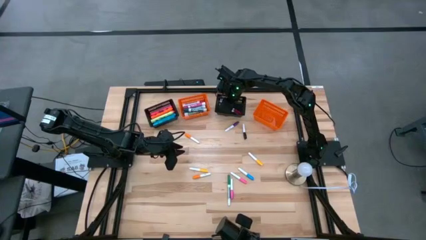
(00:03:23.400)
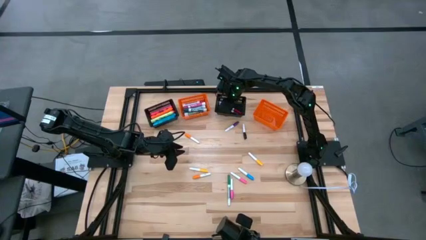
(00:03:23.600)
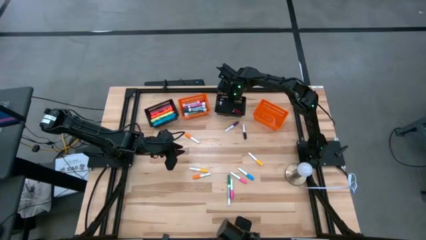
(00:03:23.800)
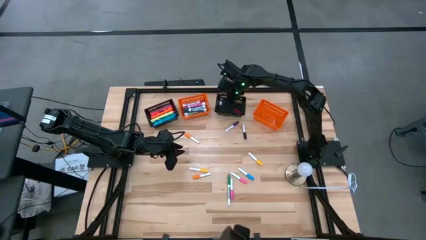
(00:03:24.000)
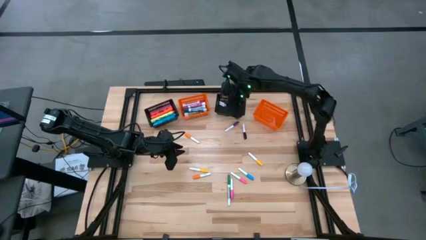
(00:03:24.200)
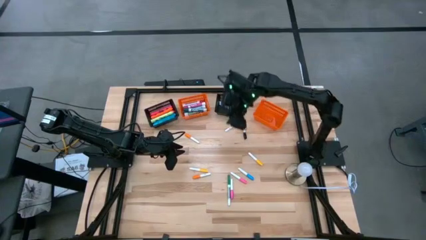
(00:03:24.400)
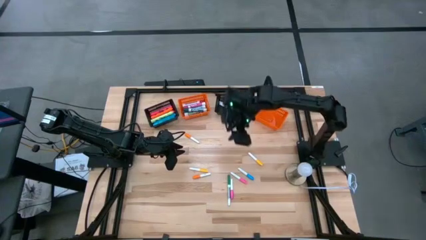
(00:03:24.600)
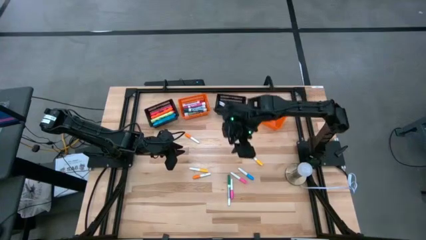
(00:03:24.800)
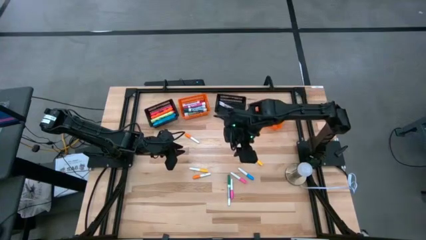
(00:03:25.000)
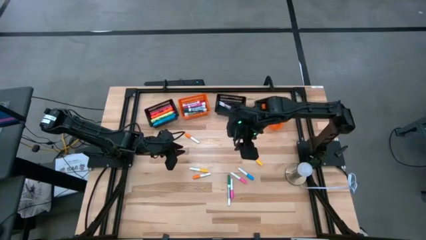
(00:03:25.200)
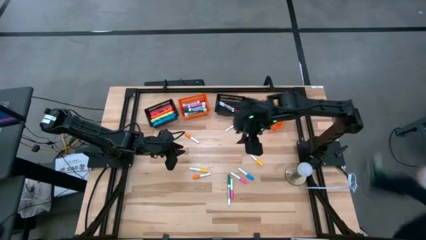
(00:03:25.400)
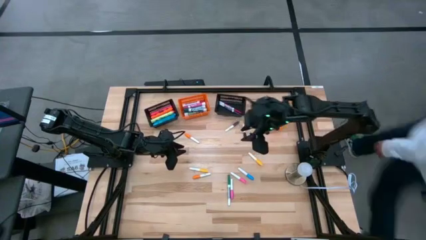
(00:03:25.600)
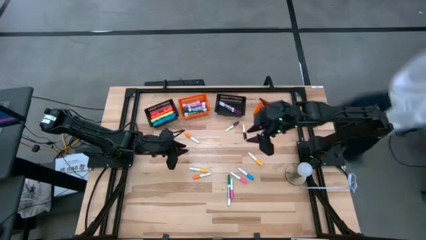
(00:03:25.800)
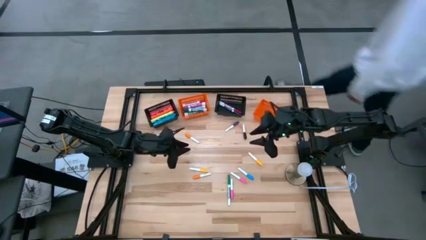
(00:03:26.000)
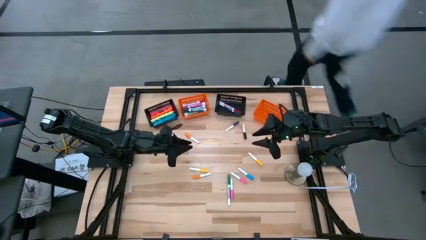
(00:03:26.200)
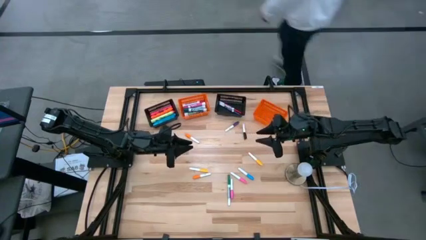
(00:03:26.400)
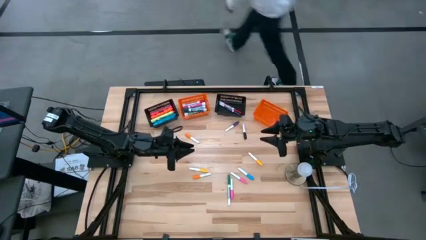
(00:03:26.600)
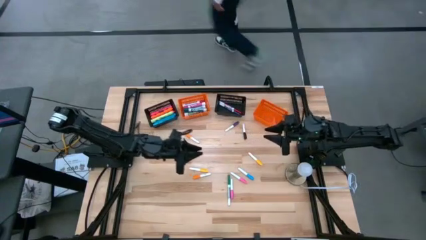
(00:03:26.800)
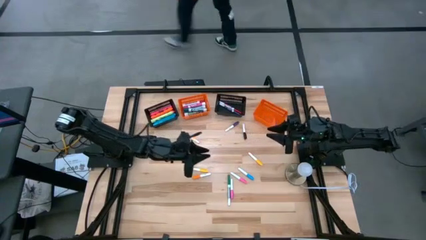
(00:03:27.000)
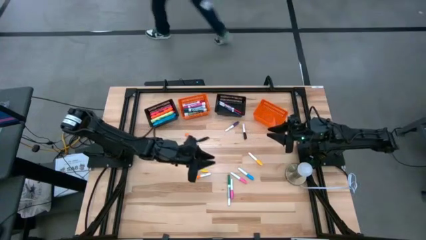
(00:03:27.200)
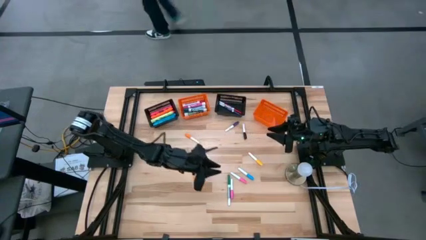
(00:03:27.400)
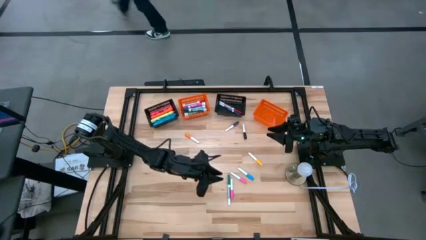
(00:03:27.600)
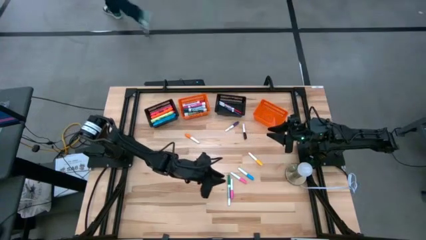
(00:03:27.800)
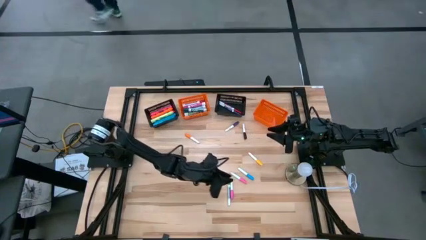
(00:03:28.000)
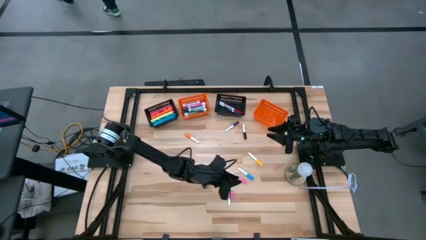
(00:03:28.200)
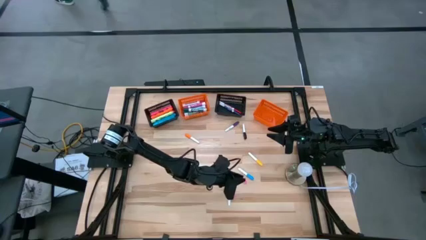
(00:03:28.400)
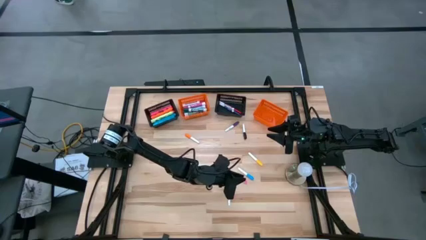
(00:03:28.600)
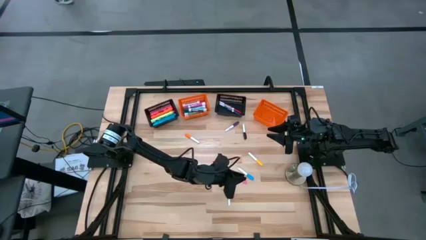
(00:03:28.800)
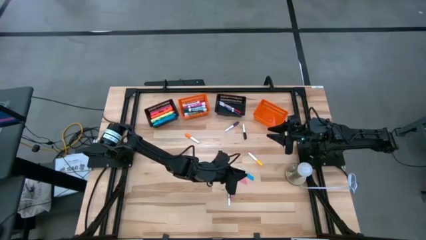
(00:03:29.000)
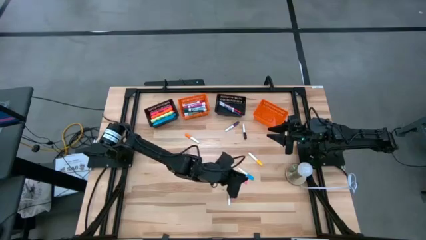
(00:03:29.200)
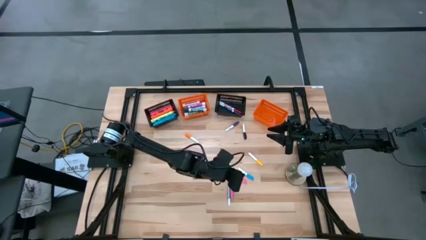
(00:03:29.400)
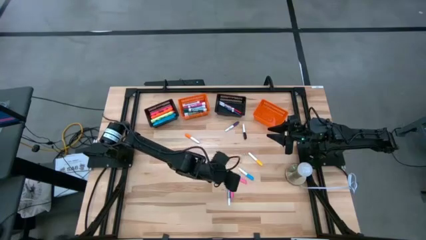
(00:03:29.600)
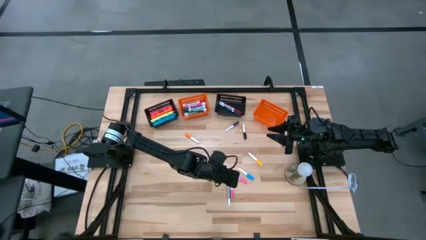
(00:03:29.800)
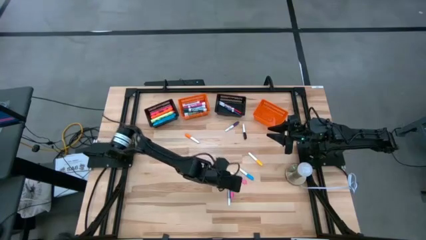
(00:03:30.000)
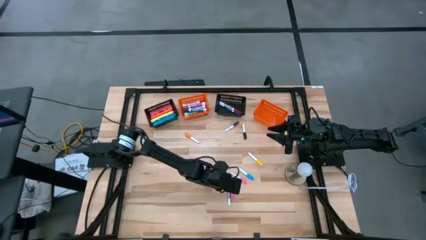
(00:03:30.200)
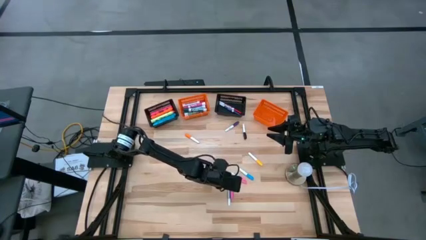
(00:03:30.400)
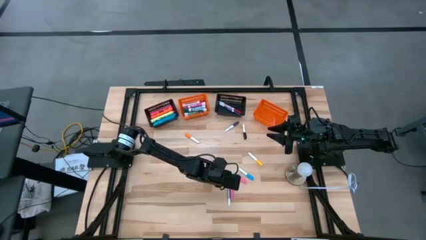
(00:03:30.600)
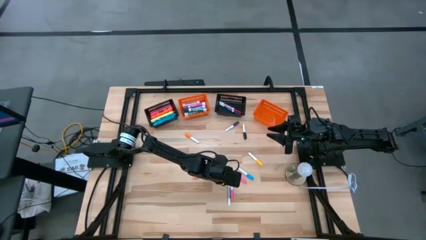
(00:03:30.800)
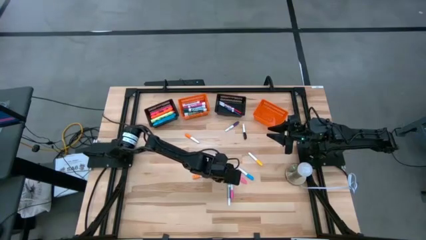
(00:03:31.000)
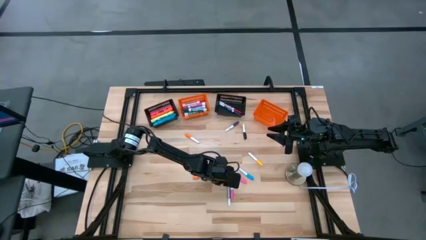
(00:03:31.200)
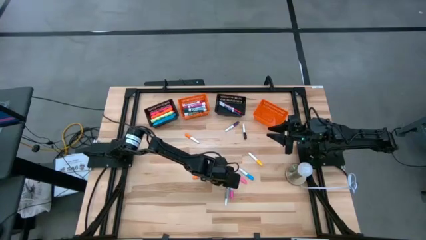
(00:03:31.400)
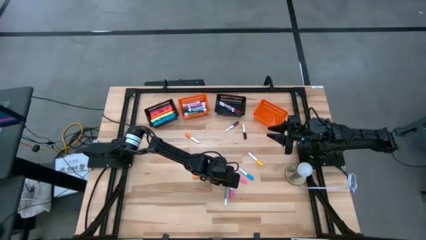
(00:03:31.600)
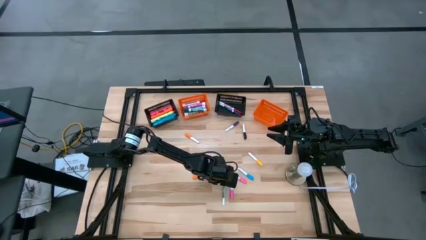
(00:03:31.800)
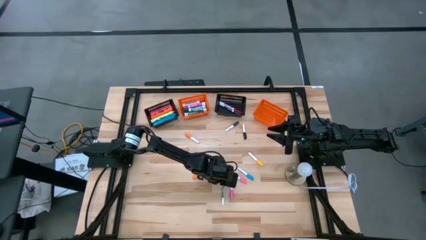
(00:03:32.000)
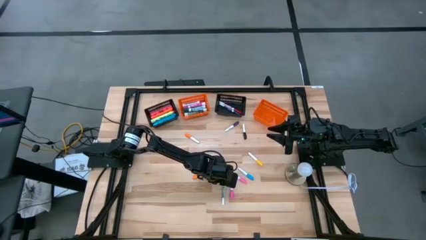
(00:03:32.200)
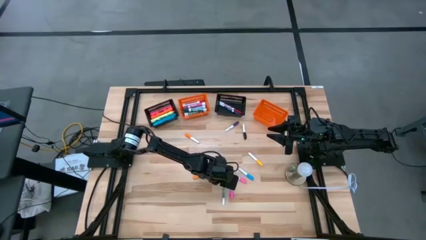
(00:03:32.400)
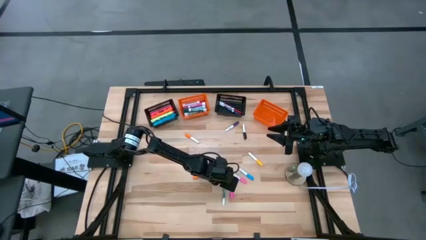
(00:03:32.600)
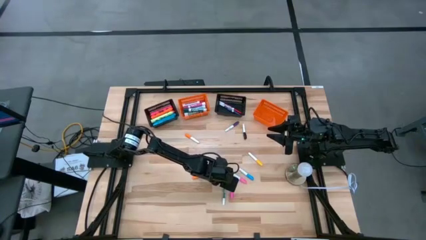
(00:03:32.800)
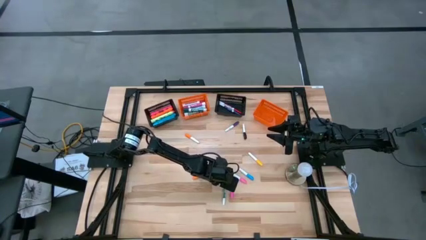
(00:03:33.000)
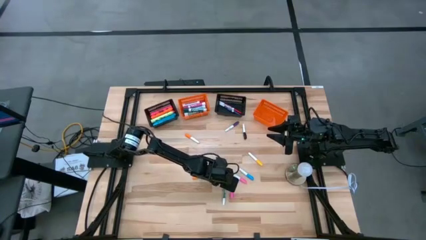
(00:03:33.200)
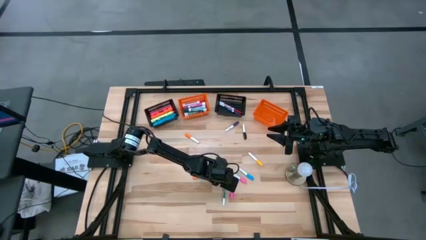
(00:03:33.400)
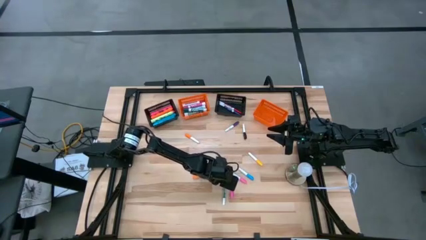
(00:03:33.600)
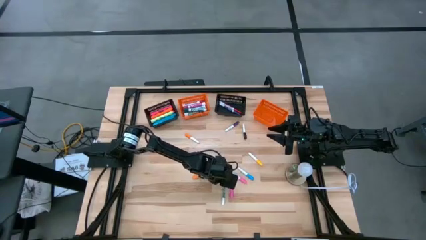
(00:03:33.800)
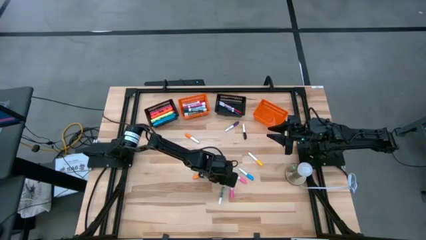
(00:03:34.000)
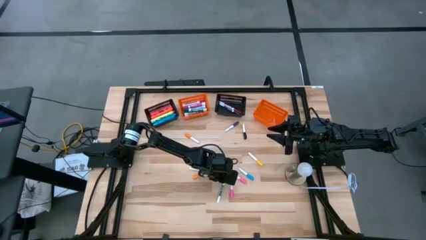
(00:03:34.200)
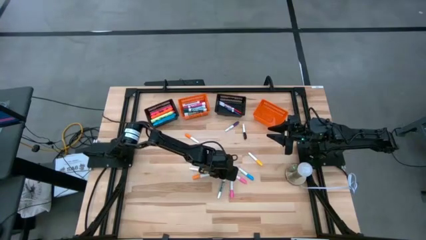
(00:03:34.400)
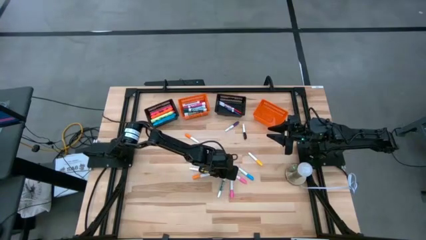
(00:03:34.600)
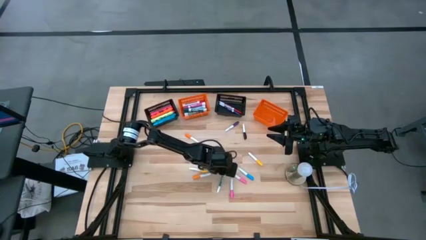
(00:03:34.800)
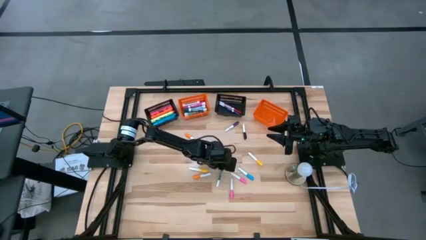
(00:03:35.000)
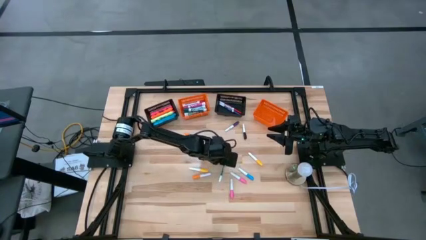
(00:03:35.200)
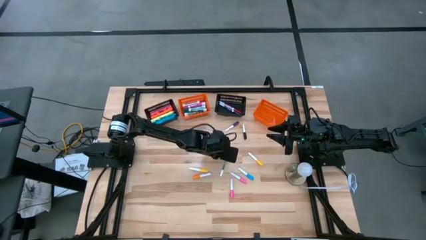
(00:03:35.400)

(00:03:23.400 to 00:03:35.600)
Task: Pick & Place Markers
Put the green small marker pen into the right black bin

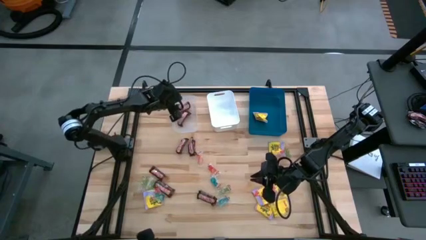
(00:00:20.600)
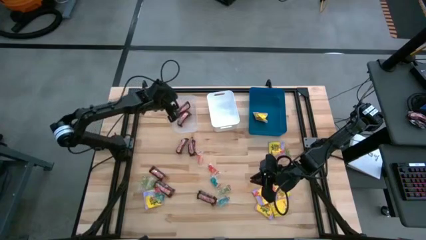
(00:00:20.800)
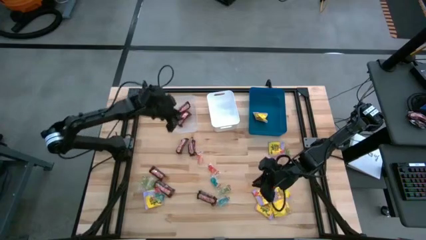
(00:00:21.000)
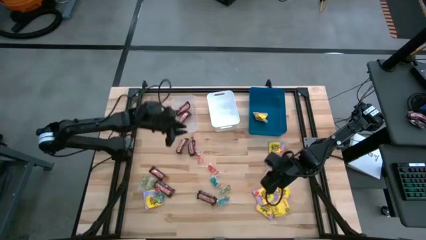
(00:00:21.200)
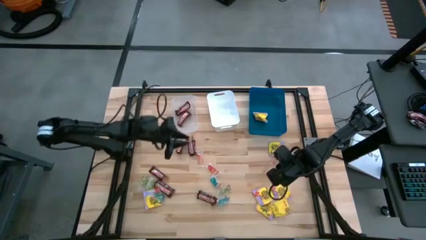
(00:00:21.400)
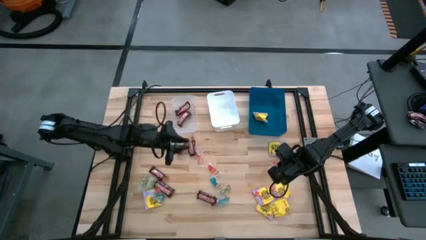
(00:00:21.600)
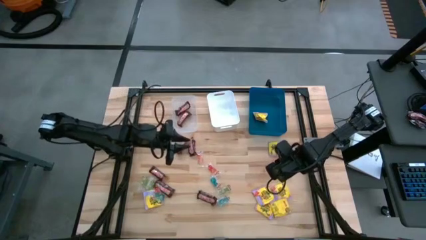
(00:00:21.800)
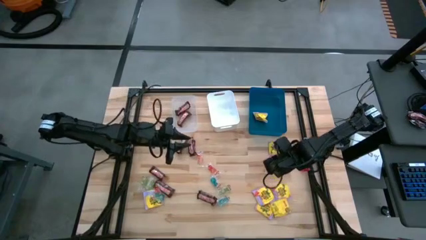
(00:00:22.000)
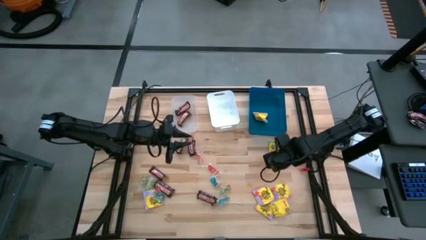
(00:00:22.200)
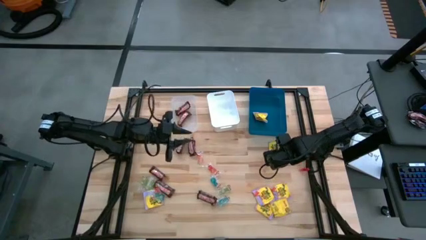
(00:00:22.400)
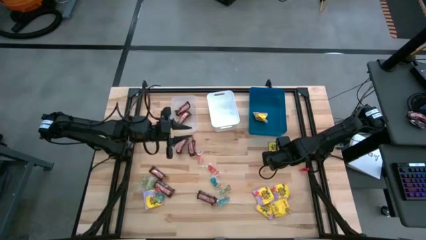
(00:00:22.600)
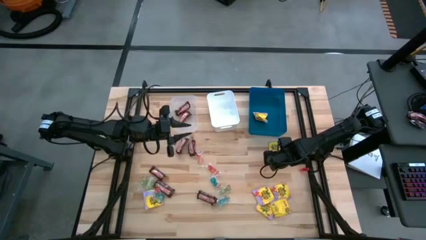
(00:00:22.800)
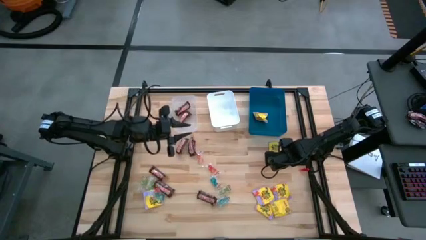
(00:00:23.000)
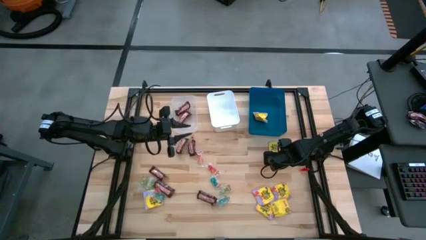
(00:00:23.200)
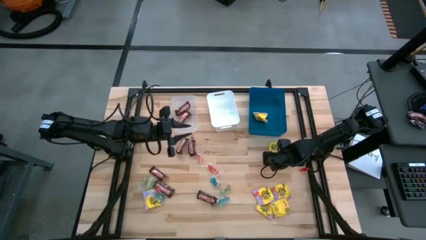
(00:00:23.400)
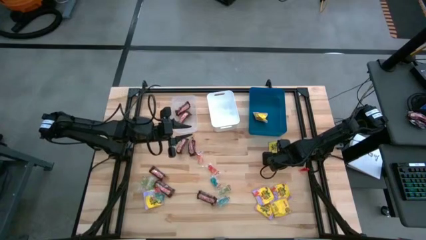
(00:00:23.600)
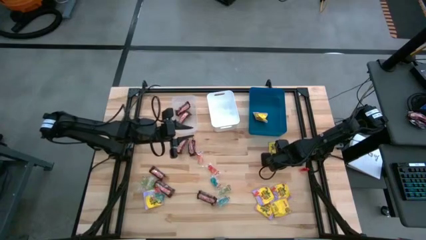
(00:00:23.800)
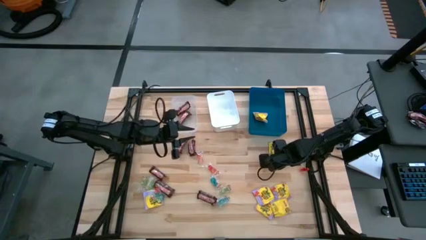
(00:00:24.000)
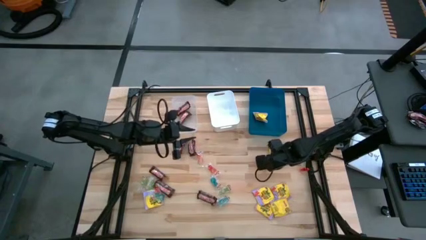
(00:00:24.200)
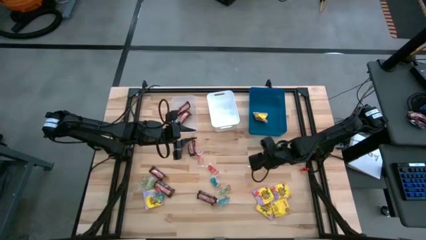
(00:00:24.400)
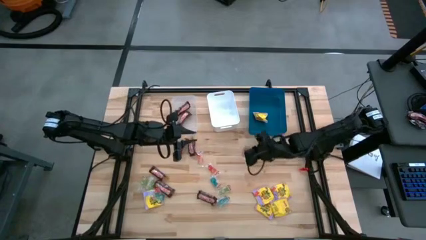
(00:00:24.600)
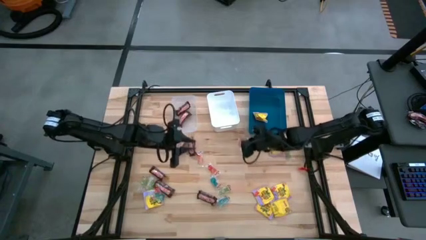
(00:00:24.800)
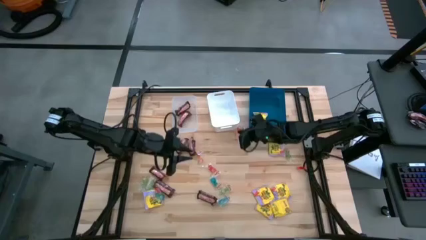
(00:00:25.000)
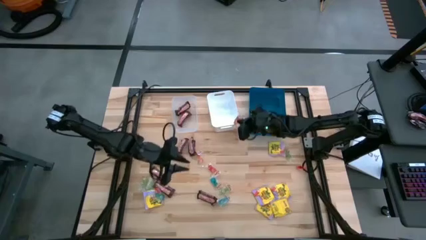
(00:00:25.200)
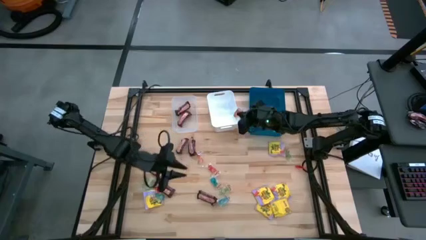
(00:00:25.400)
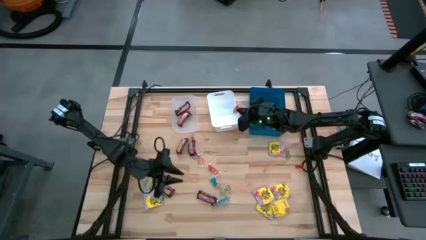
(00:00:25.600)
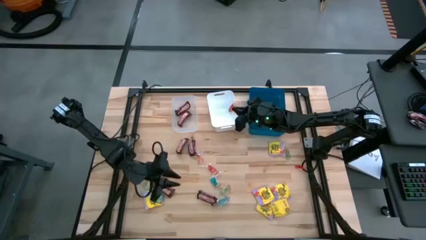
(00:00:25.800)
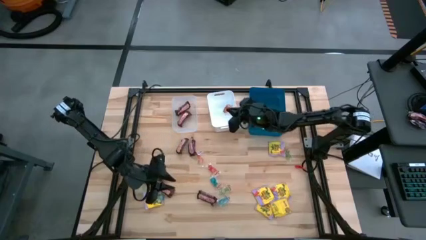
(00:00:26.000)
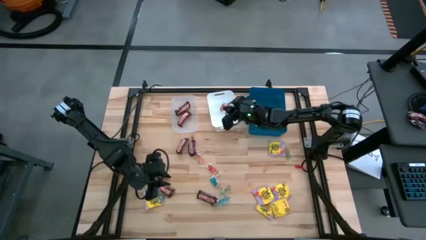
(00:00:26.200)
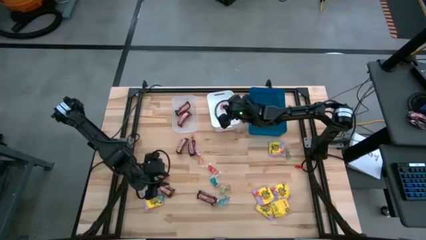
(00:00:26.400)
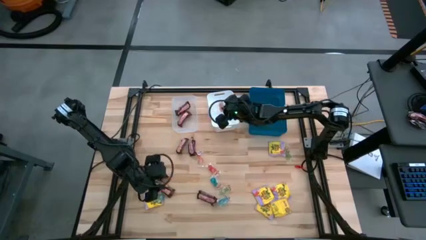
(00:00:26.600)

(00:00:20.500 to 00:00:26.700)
Task: Sort candy
Put the middle right orange jelly candy into the white bin
